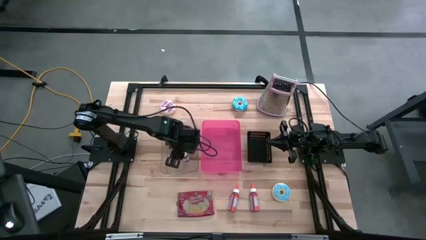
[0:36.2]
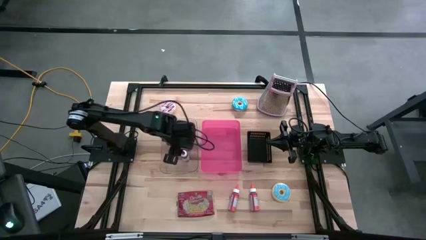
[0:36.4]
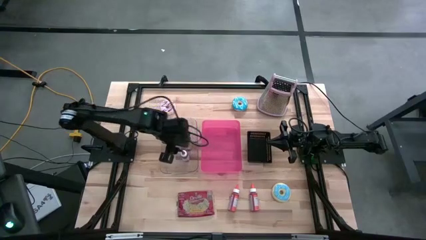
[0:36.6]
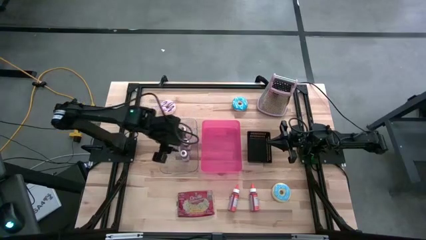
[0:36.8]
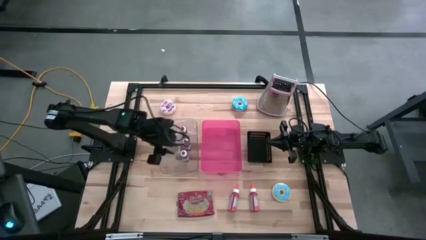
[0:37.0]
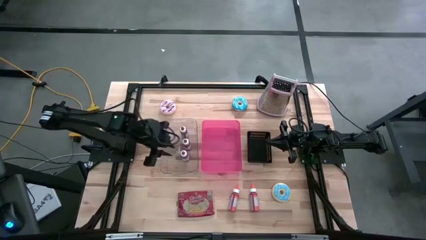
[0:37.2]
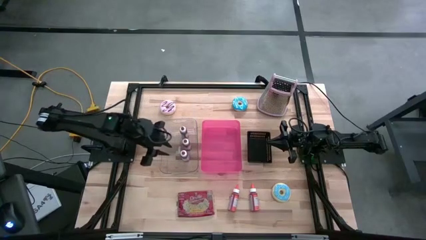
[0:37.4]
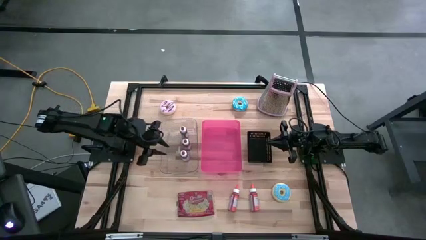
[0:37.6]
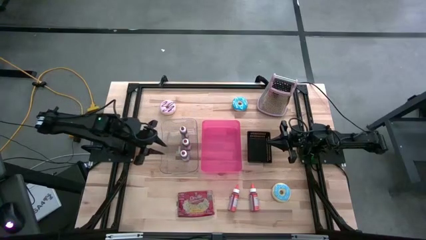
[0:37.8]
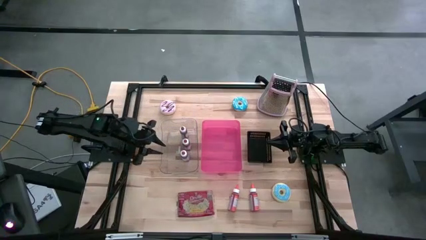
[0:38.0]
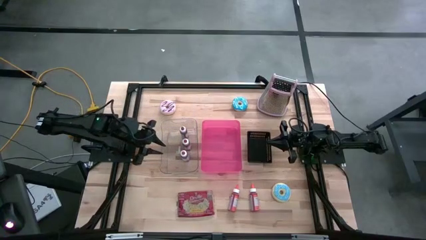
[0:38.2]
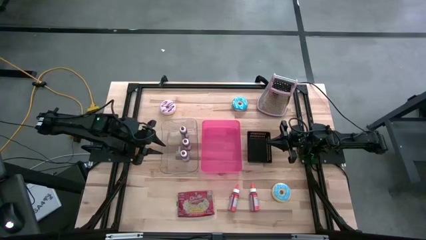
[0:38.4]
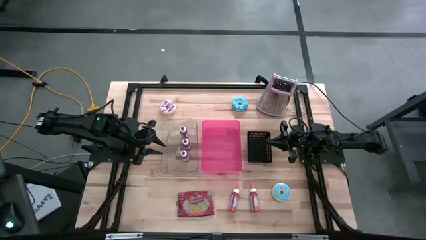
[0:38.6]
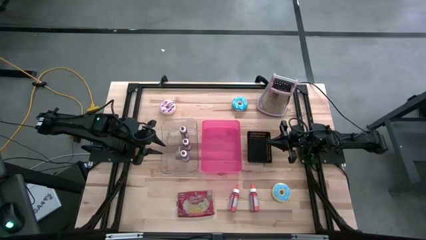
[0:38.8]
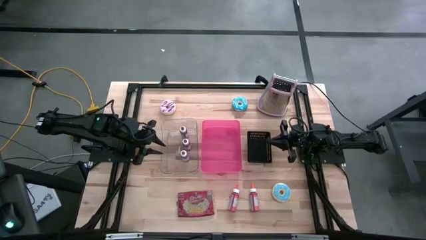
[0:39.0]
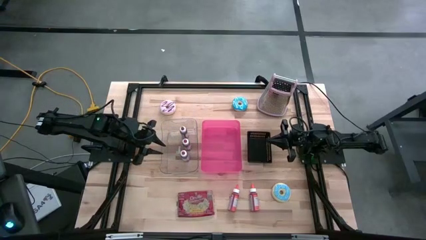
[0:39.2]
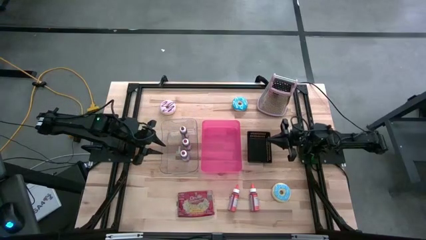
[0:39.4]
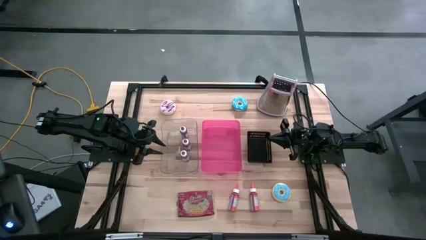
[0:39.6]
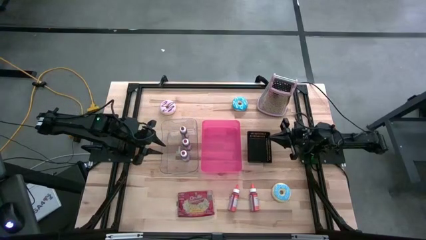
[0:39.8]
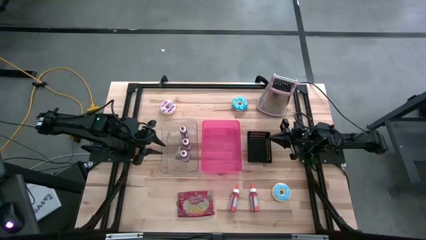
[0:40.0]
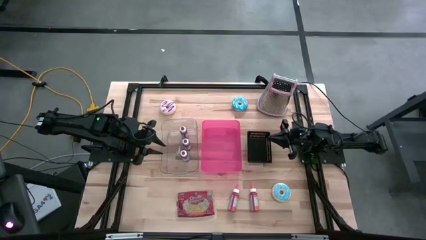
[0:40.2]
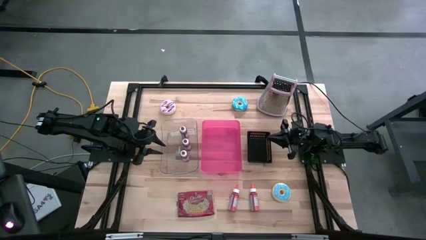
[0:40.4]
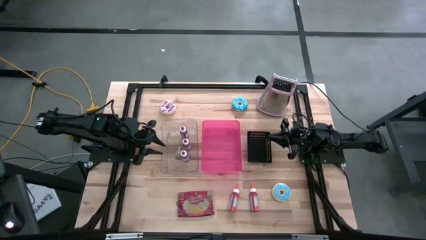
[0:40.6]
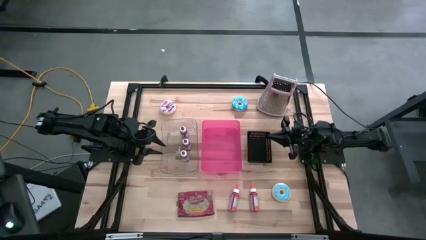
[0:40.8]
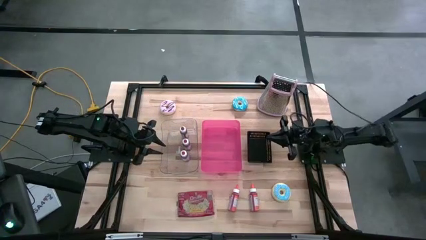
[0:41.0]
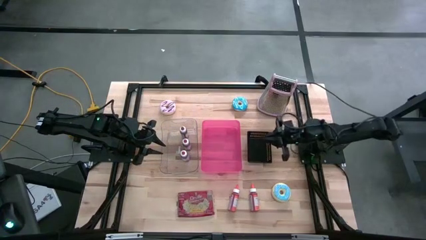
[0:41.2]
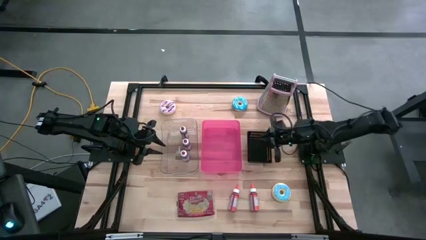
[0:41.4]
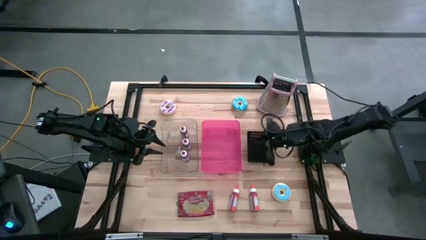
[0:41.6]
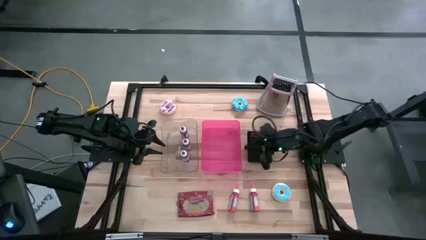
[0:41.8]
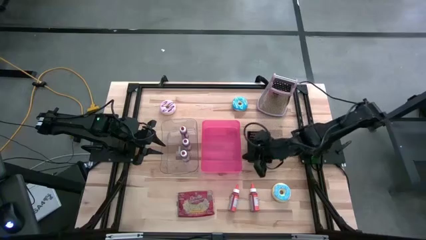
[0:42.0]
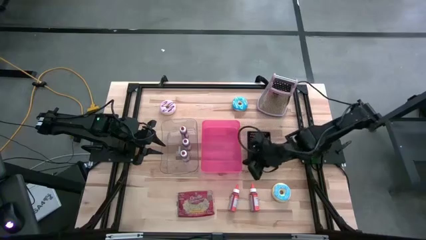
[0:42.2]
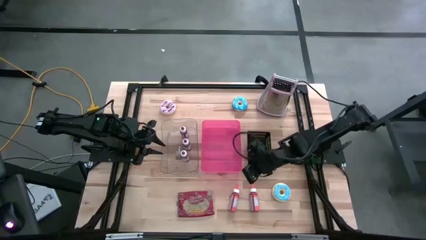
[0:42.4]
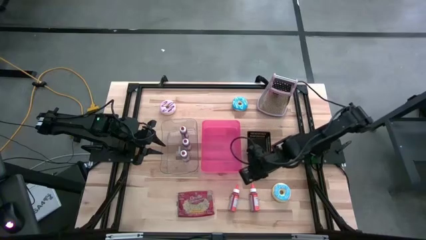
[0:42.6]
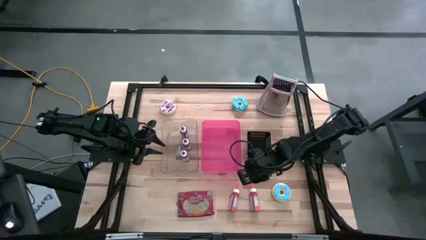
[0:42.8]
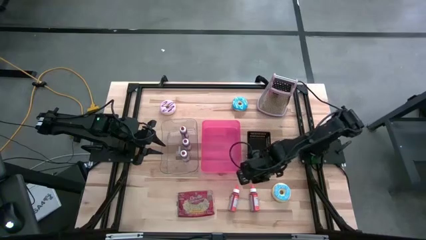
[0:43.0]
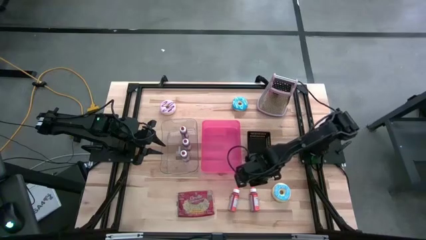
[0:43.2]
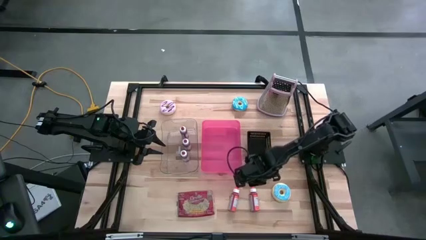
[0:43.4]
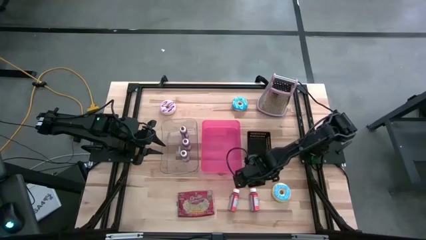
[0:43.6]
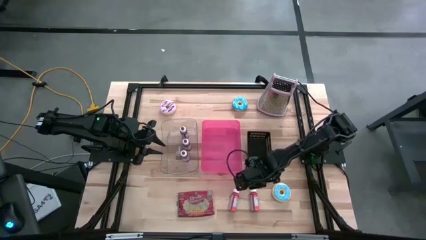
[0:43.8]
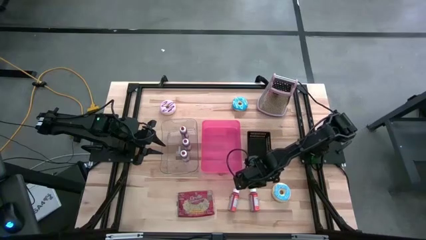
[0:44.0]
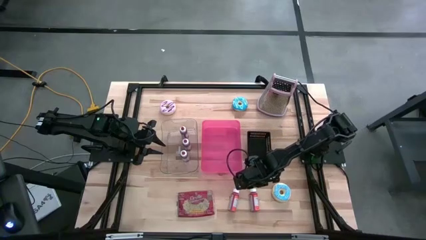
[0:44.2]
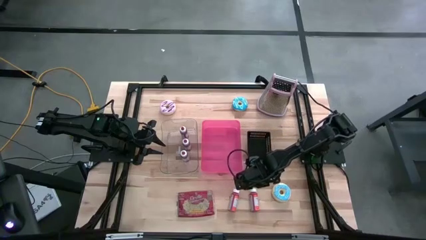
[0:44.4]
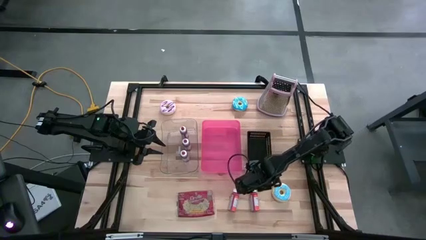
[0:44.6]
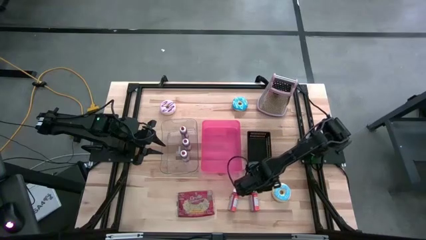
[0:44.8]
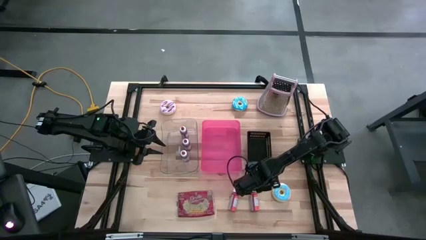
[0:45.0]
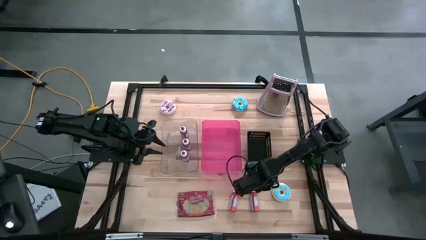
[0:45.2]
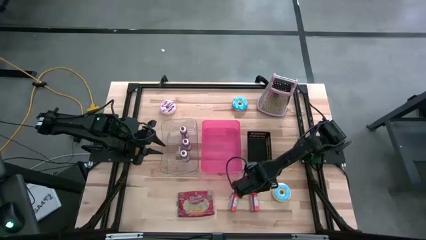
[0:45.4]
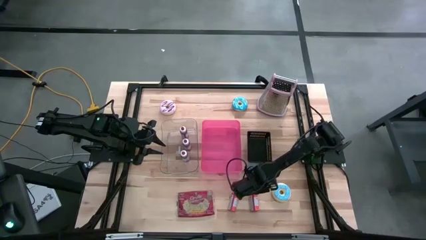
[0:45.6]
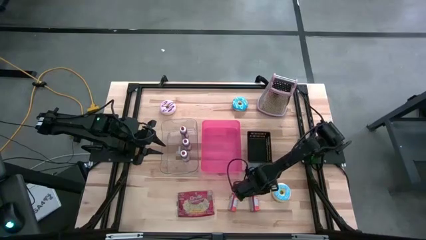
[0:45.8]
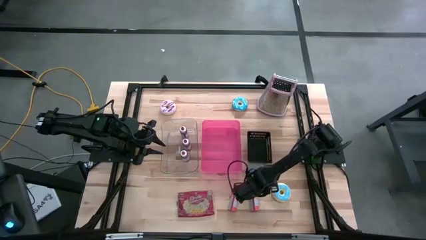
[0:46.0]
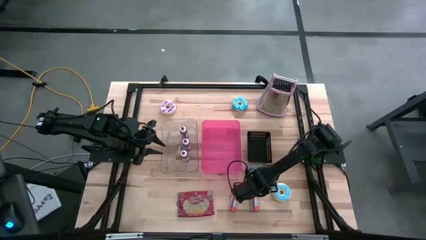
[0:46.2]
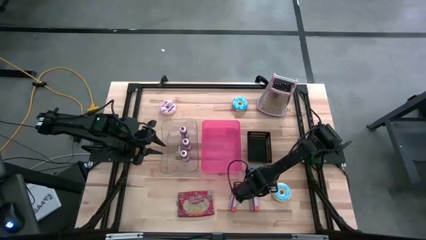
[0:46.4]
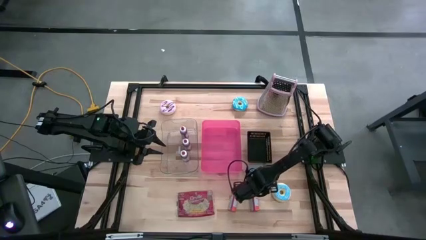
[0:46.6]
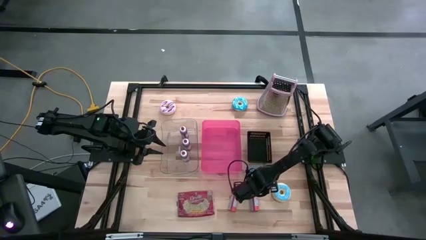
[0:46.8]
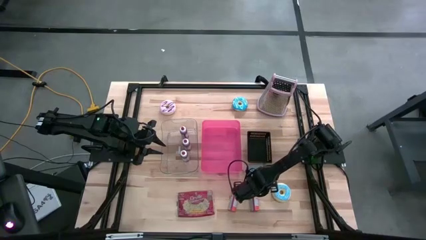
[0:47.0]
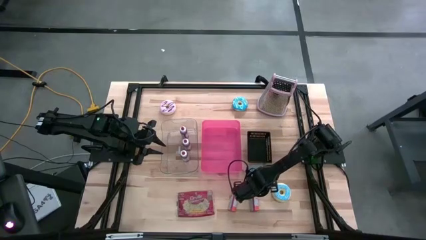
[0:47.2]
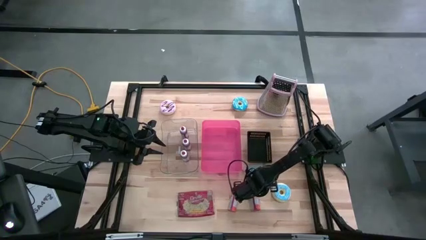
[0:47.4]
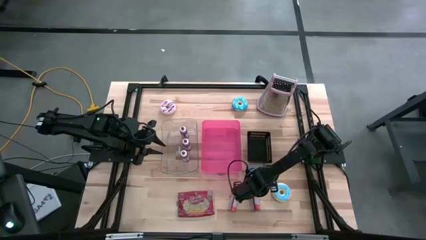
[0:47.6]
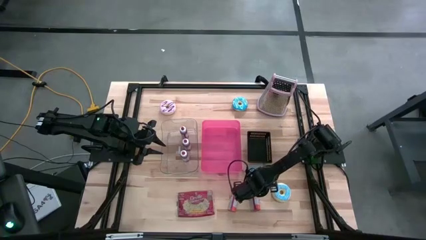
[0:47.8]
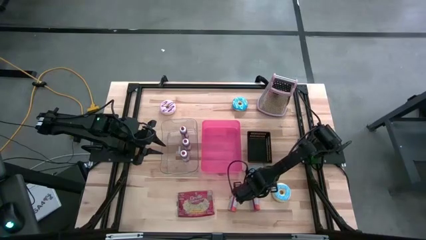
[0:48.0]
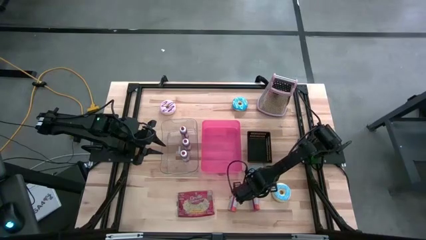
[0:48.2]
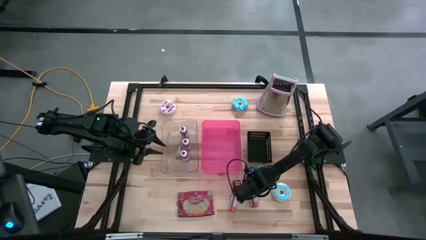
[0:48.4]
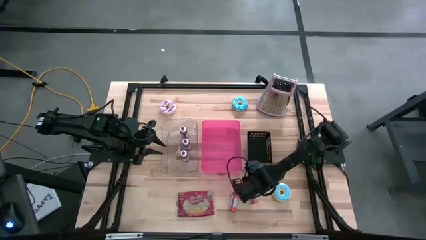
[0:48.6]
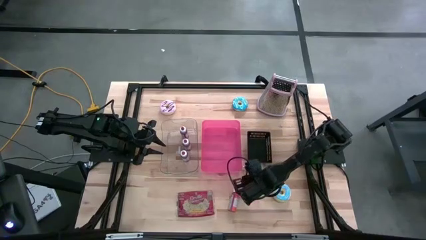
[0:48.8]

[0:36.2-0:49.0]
Task: Pick & Place Food Item
Put the right orange food coloring bottle into the transparent bin
